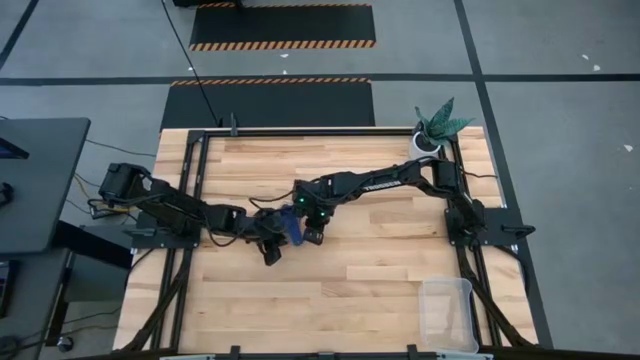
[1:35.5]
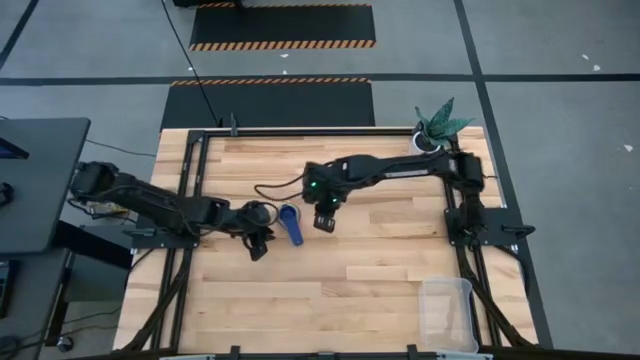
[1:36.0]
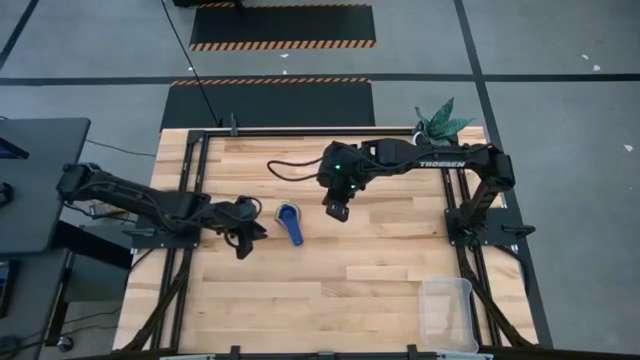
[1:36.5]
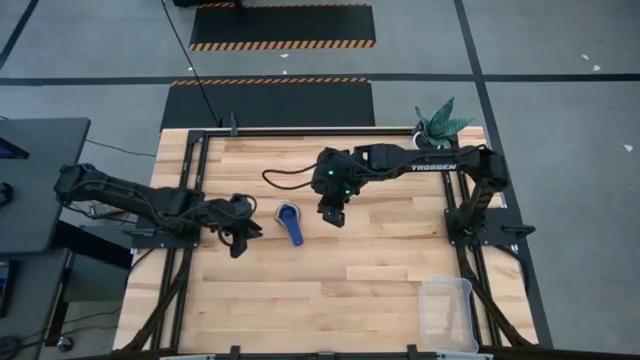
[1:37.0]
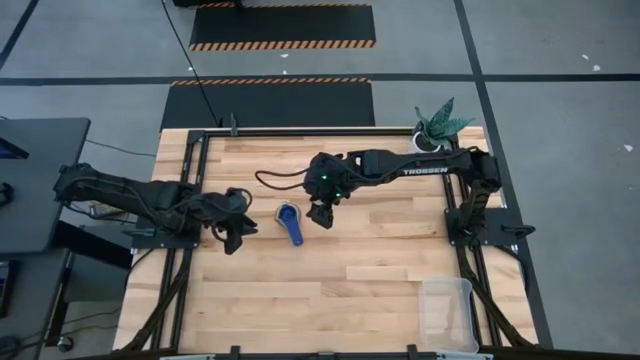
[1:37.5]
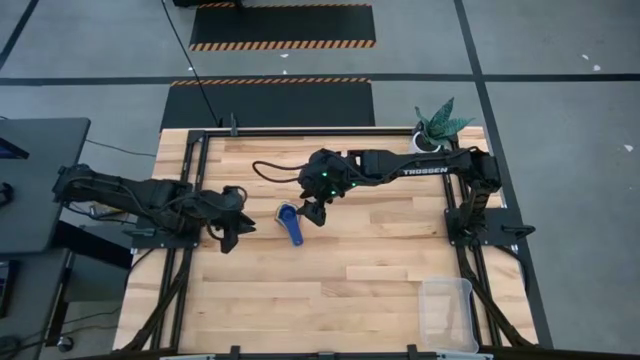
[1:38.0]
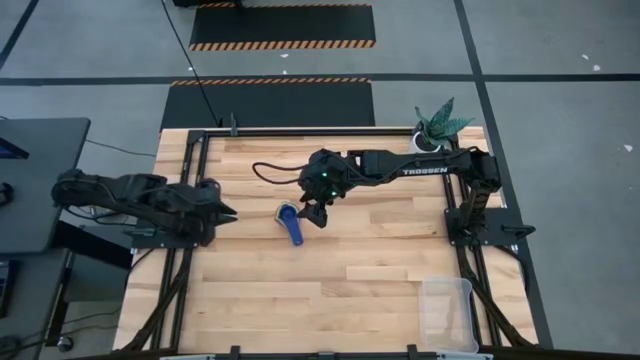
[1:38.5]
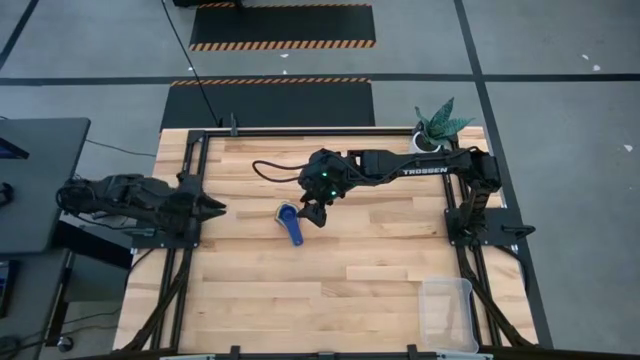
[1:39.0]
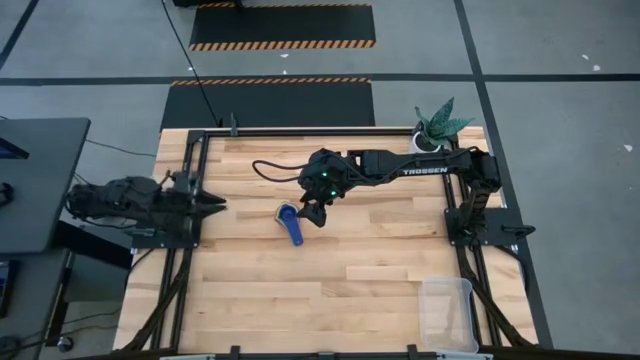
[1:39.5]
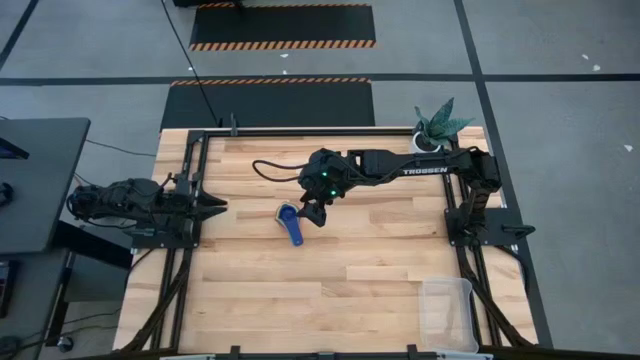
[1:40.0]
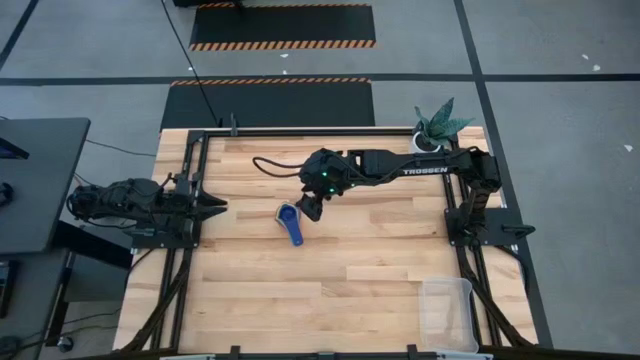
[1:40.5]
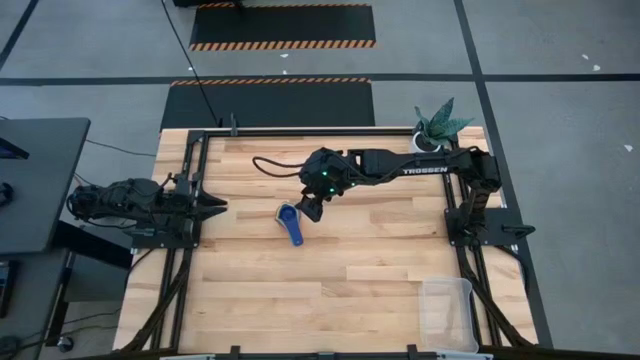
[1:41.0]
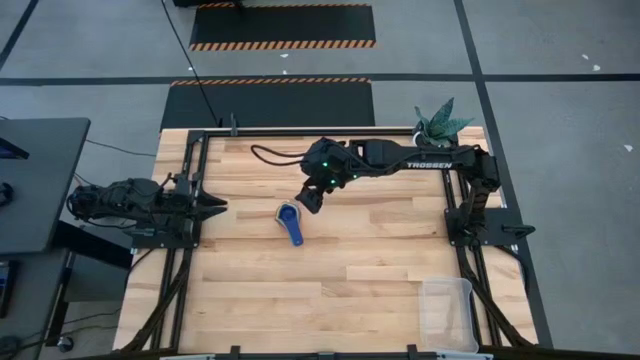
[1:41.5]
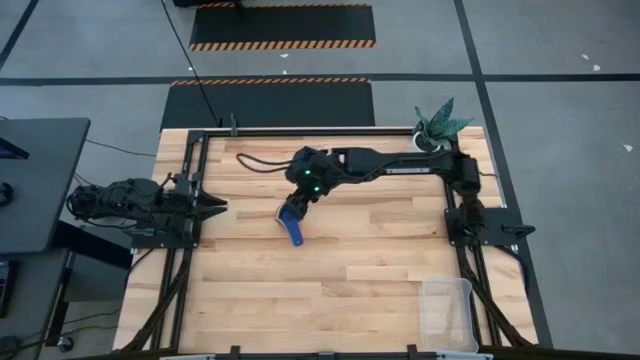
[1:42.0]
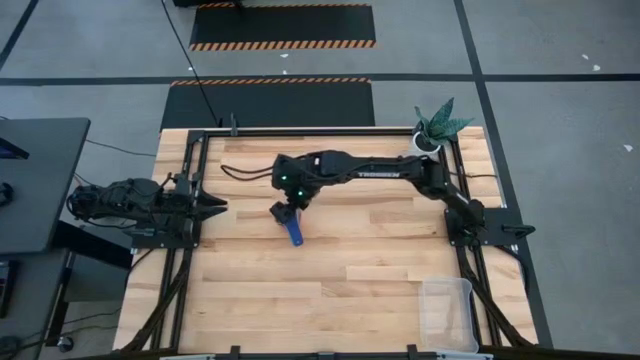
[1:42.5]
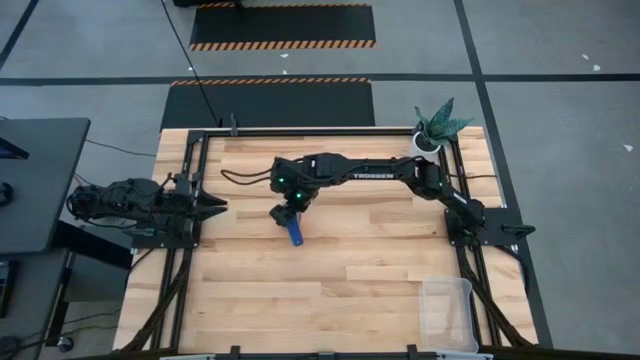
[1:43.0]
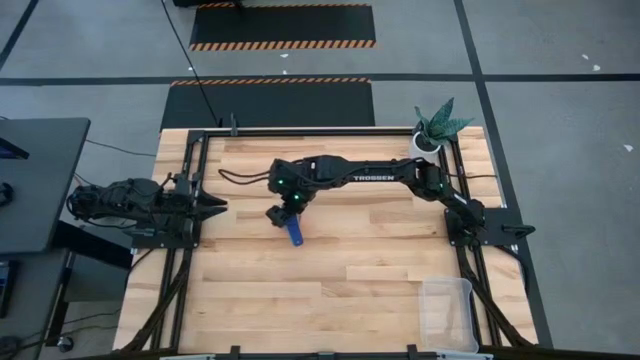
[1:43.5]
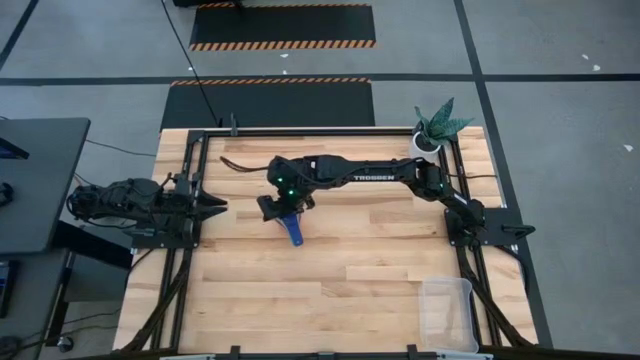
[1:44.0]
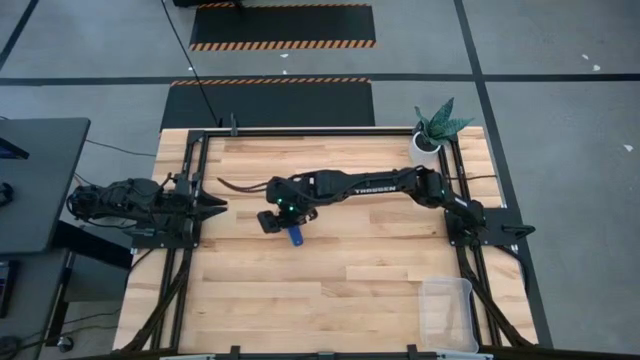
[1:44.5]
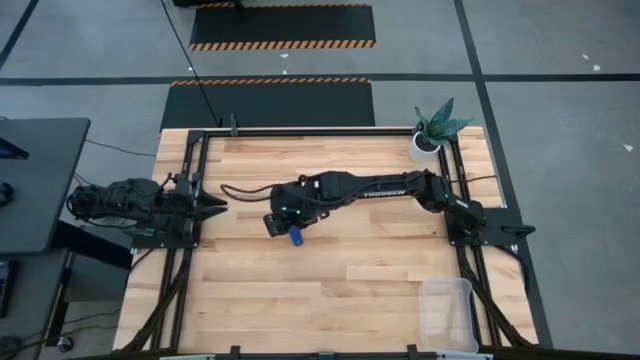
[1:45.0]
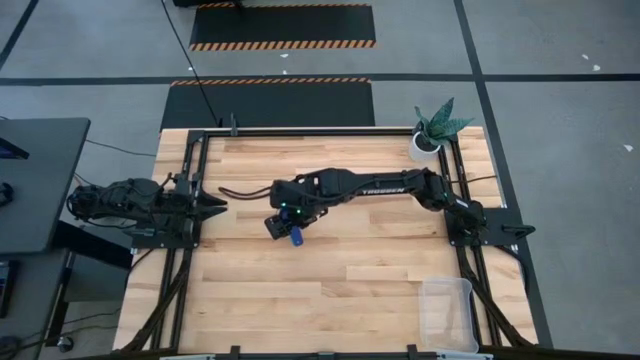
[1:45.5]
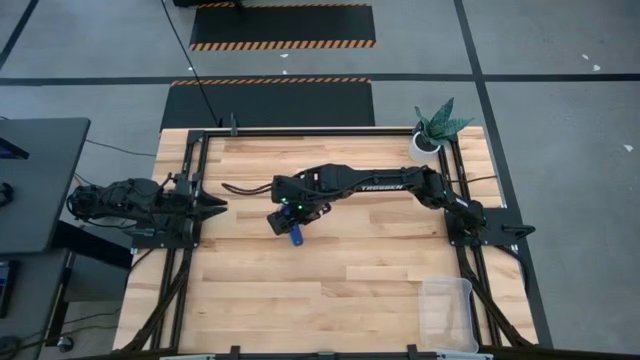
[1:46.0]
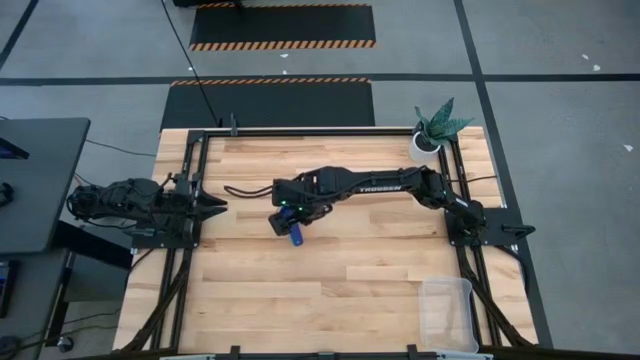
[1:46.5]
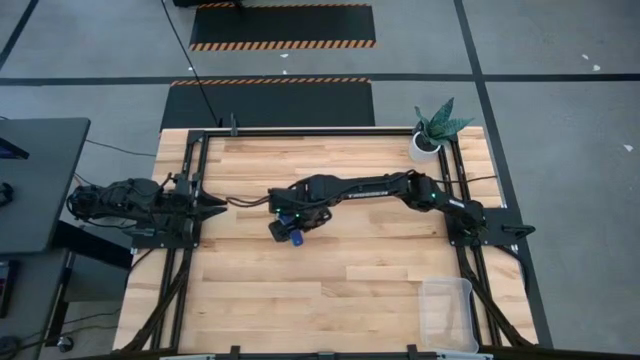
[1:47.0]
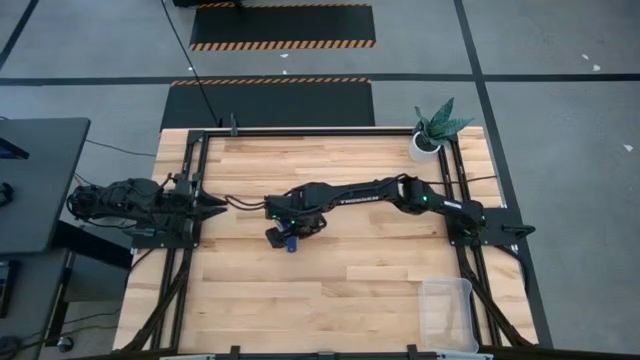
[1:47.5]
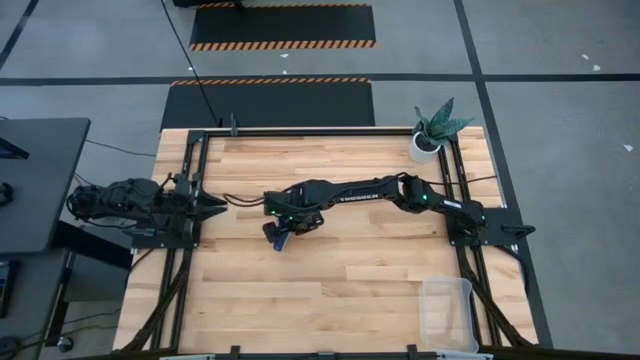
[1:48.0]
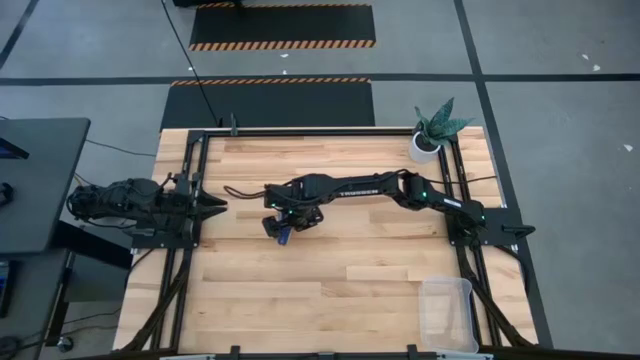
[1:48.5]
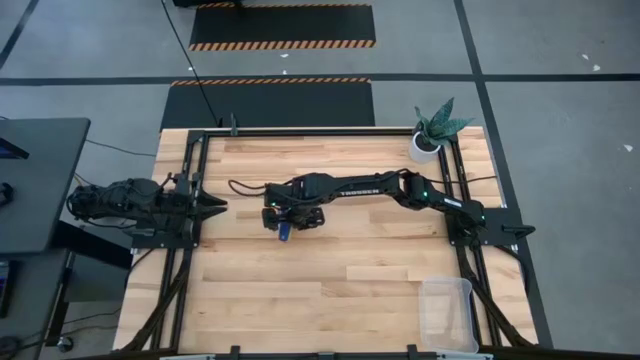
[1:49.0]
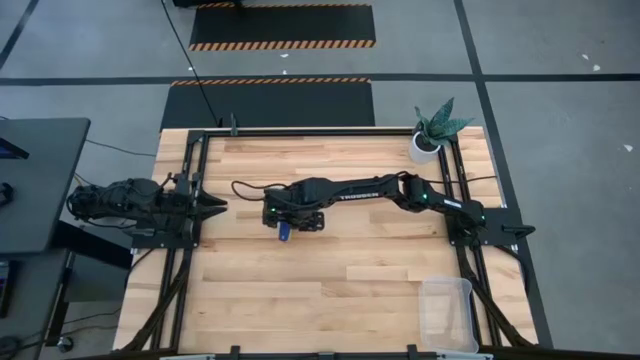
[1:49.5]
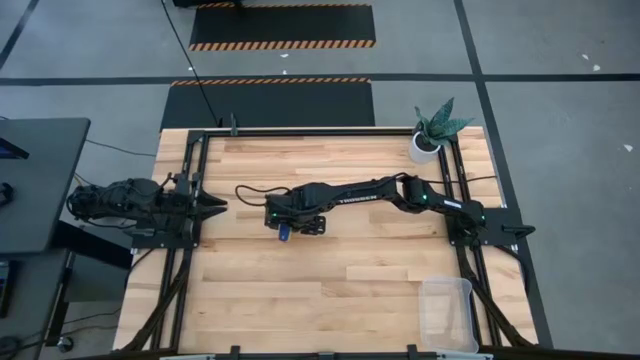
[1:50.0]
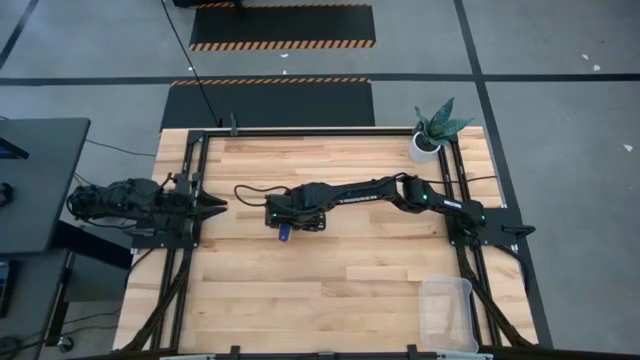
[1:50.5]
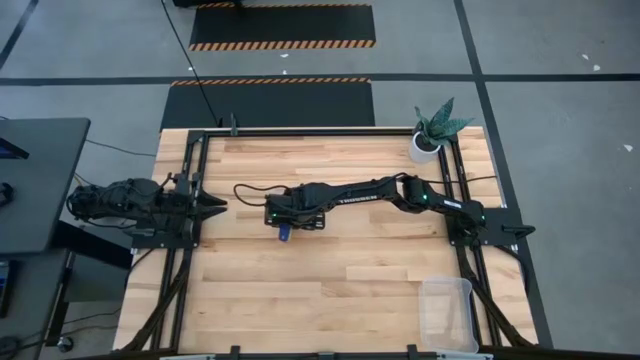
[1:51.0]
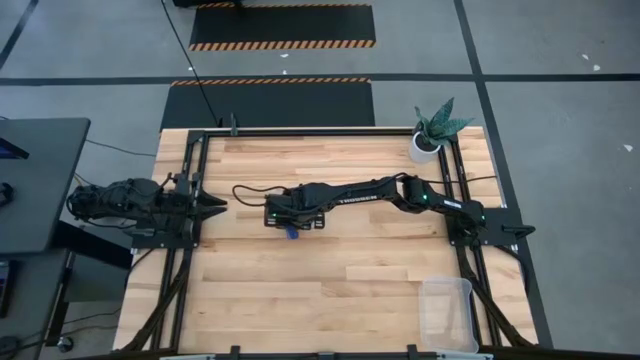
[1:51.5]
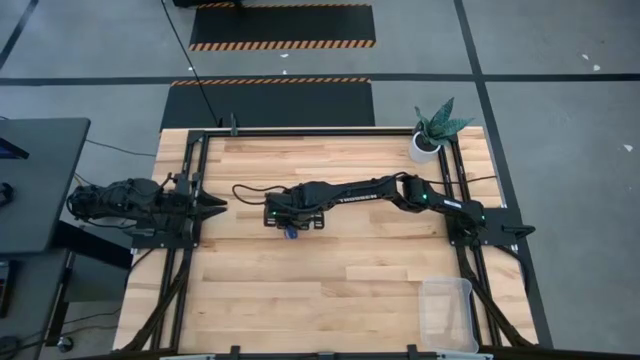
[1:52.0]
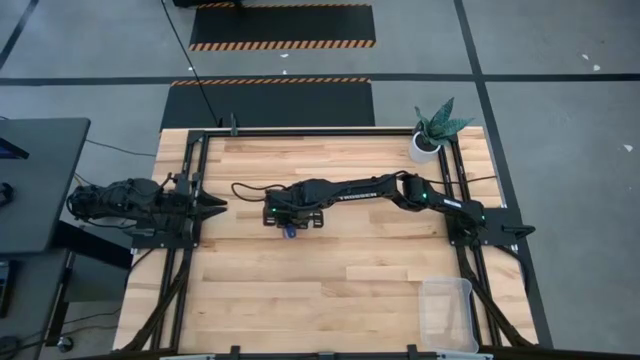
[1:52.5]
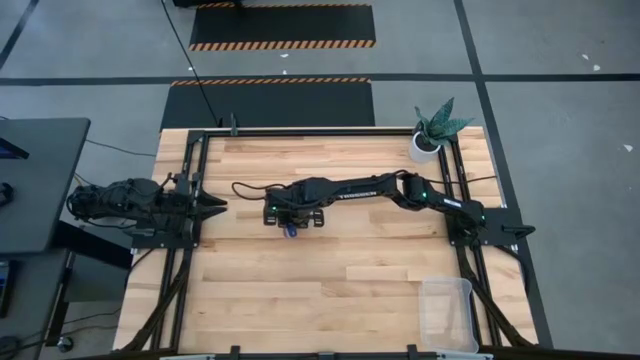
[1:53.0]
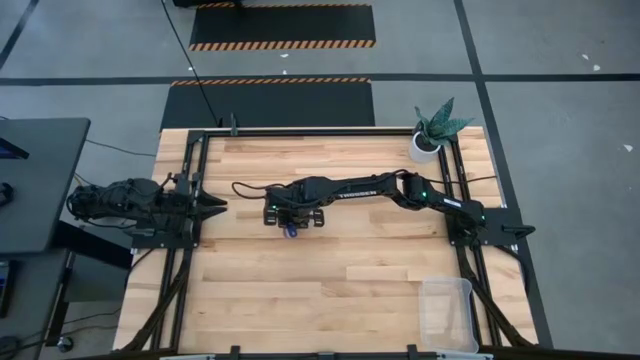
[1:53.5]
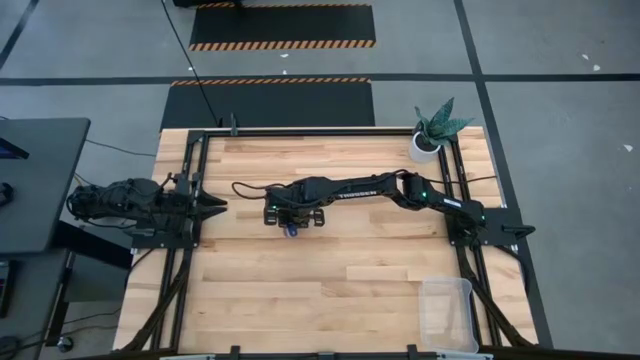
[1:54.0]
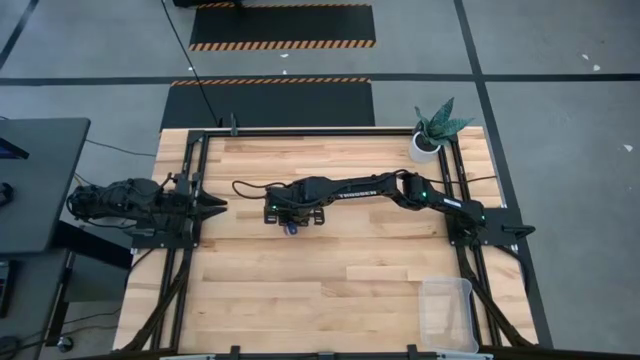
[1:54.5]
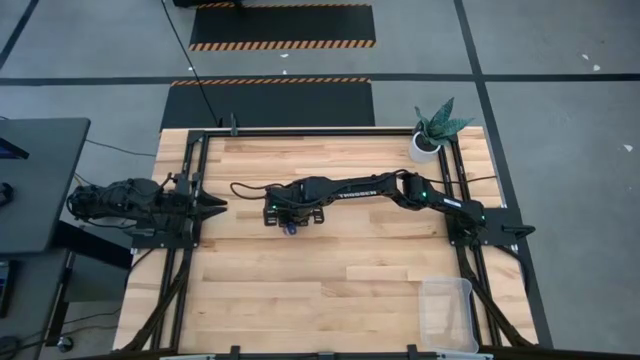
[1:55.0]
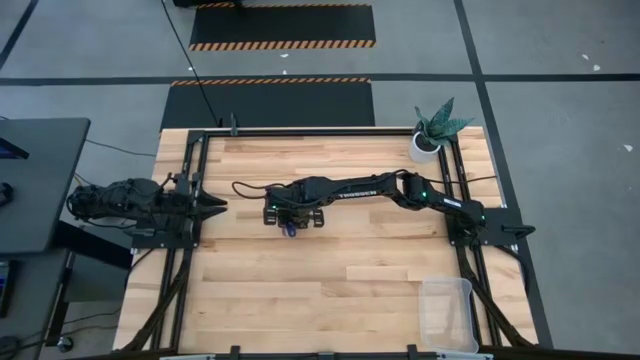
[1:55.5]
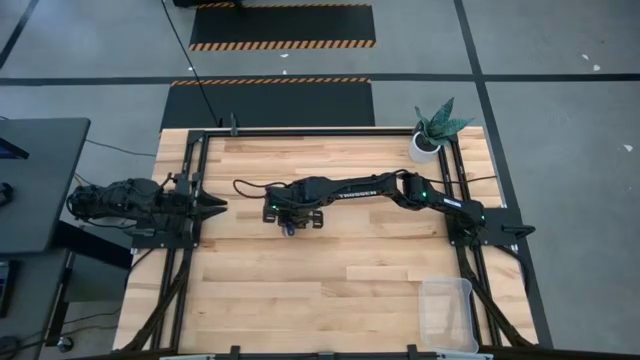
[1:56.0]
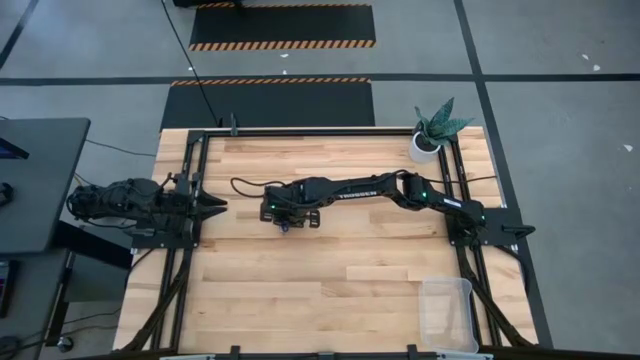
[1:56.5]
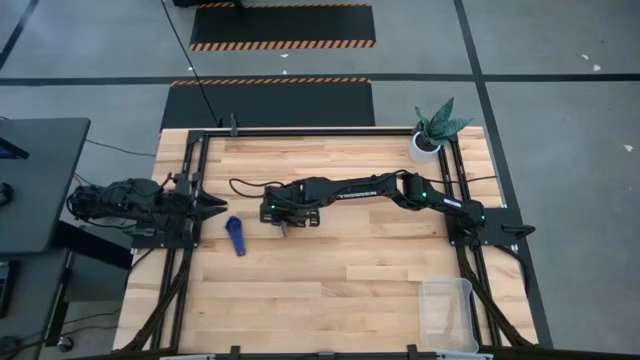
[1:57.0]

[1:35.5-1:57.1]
Task: Nest measuring cups in basket
Put the nested measuring cups into the transparent bin

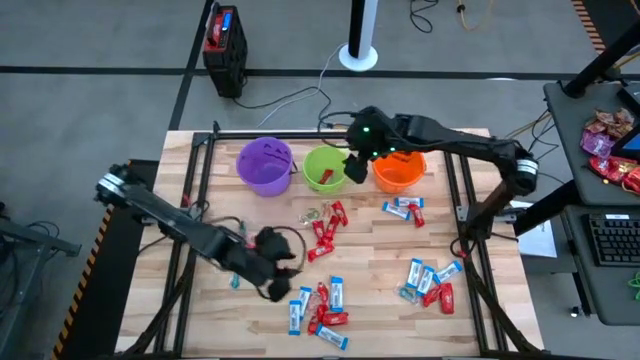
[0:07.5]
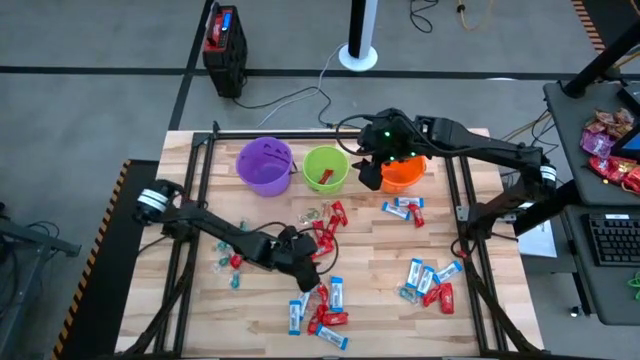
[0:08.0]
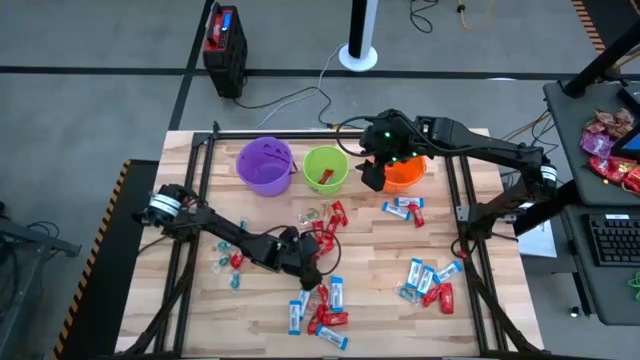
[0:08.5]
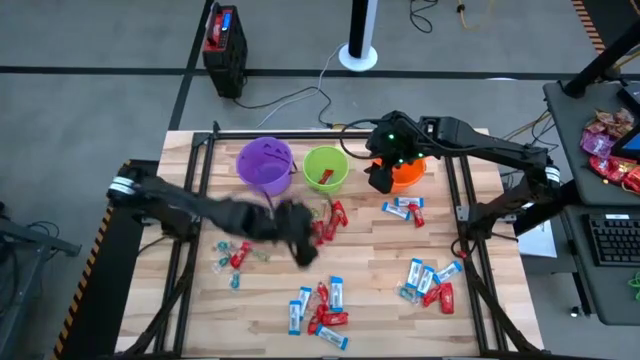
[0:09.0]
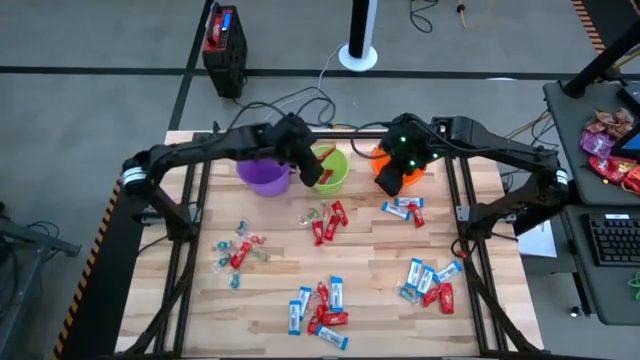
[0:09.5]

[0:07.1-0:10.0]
Task: Sort candy by brand, put in halloween buckets
Put the red chocolate bar into the green bucket
